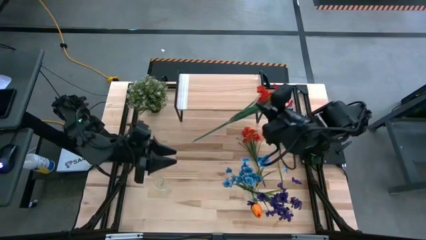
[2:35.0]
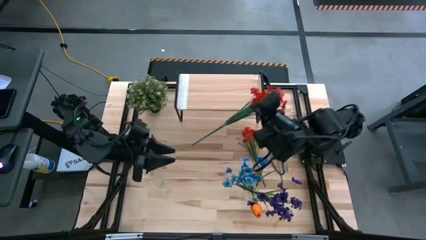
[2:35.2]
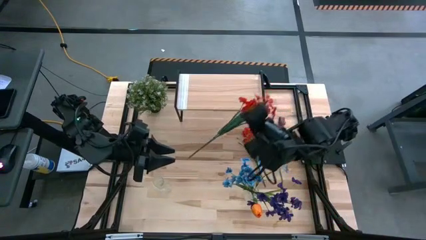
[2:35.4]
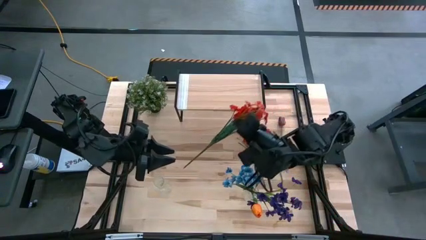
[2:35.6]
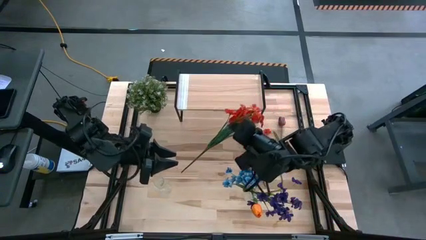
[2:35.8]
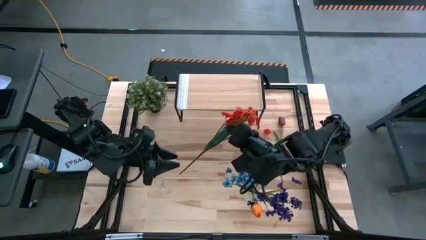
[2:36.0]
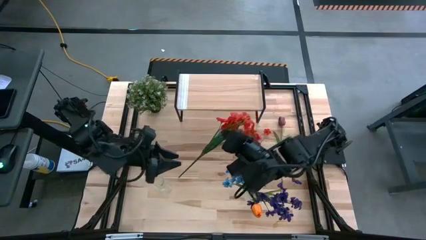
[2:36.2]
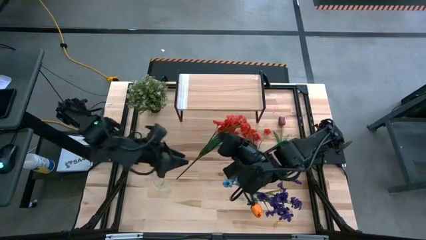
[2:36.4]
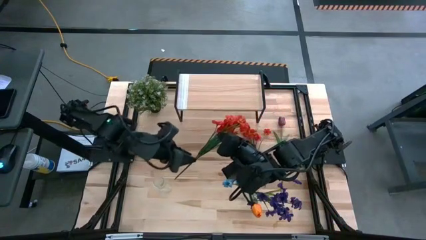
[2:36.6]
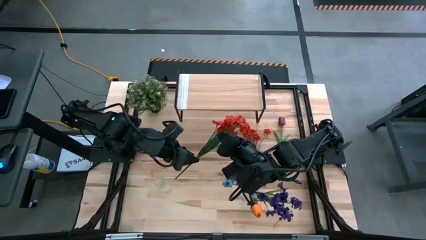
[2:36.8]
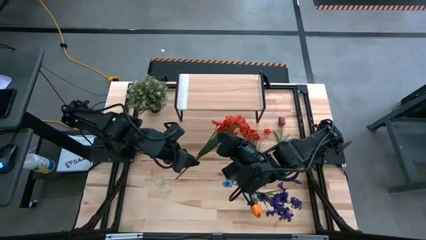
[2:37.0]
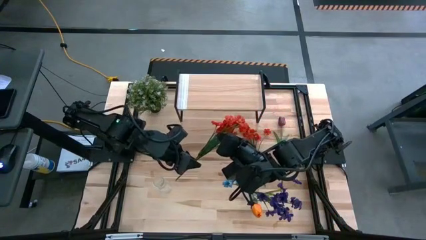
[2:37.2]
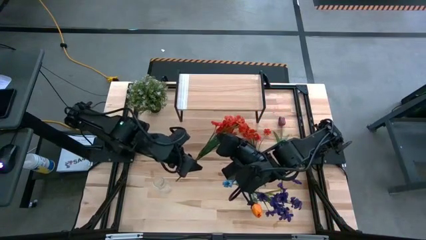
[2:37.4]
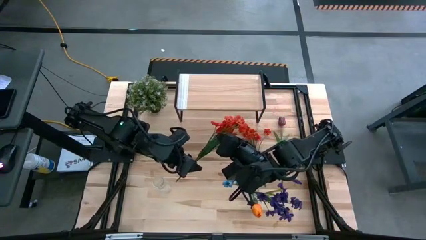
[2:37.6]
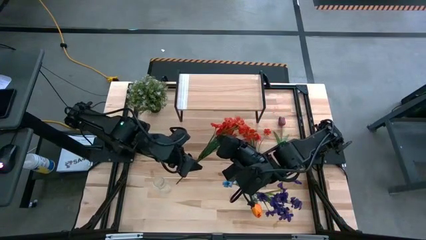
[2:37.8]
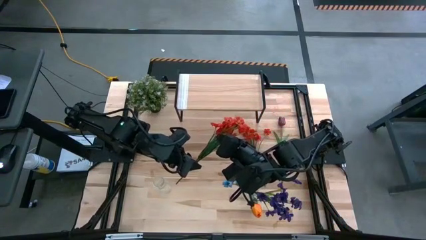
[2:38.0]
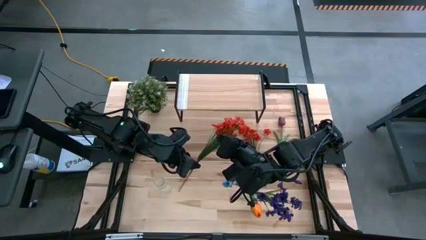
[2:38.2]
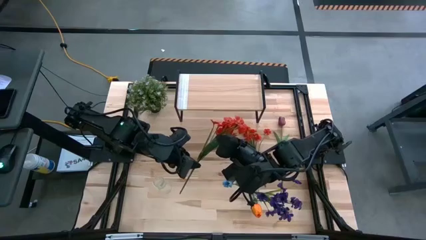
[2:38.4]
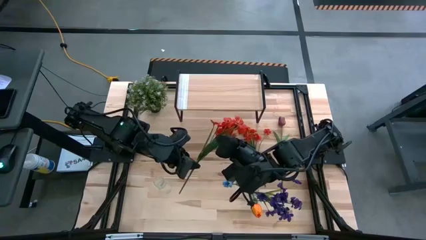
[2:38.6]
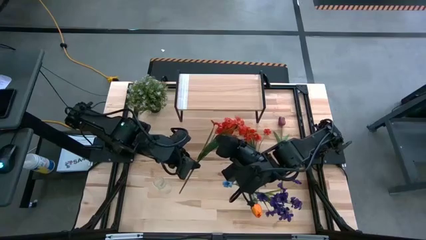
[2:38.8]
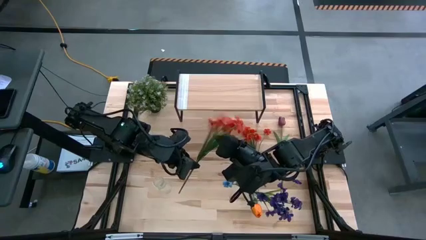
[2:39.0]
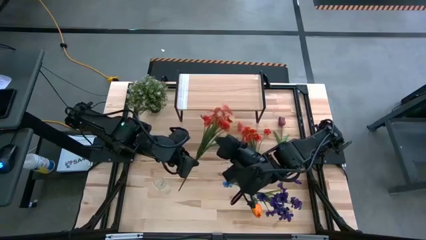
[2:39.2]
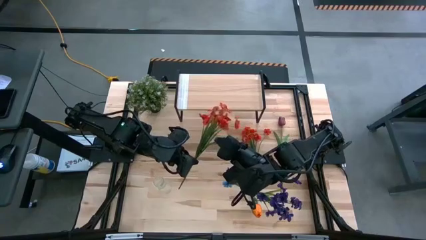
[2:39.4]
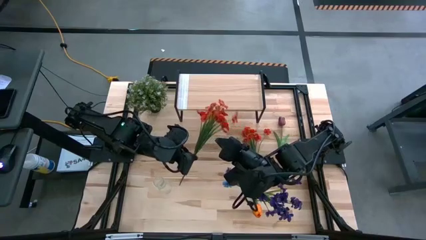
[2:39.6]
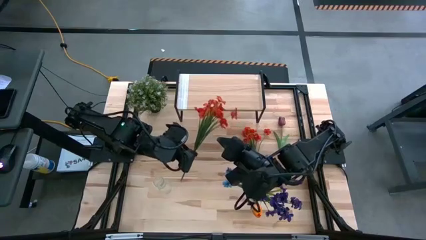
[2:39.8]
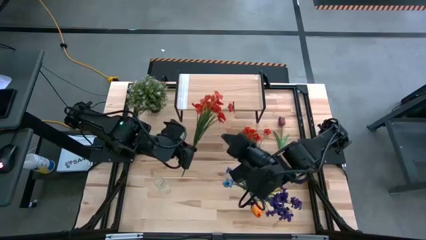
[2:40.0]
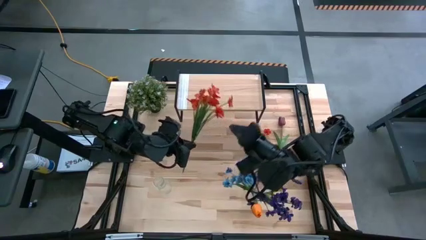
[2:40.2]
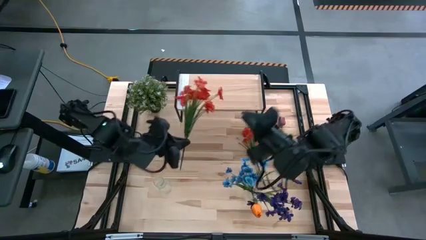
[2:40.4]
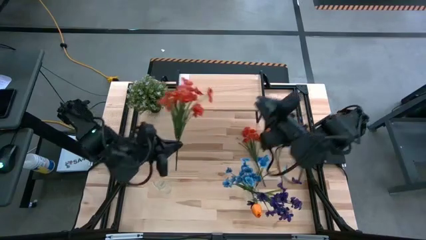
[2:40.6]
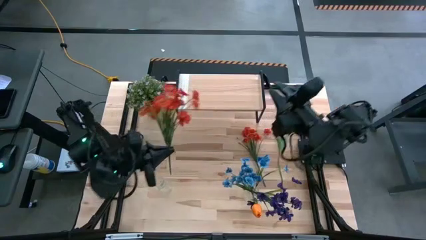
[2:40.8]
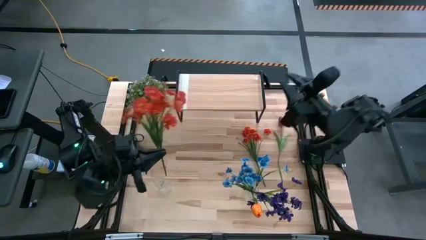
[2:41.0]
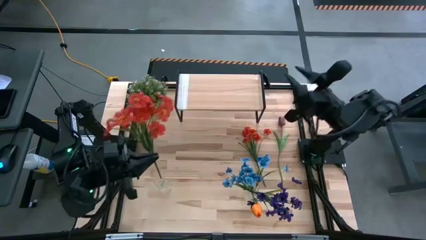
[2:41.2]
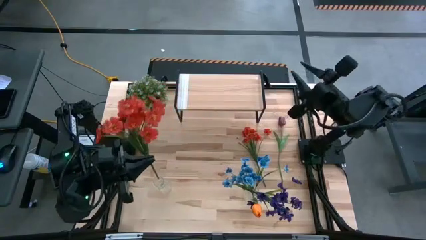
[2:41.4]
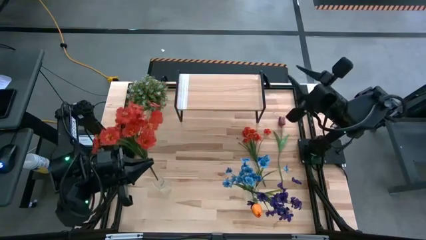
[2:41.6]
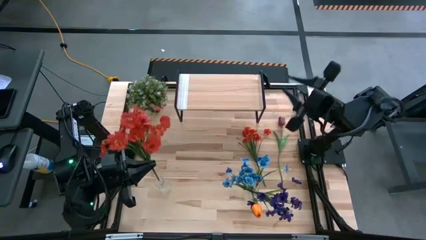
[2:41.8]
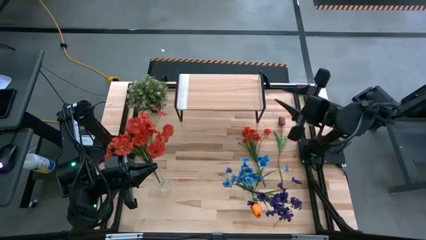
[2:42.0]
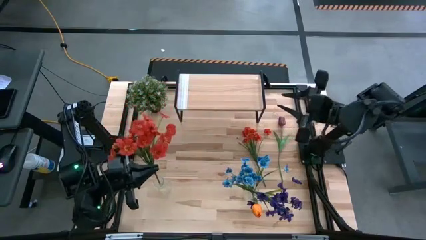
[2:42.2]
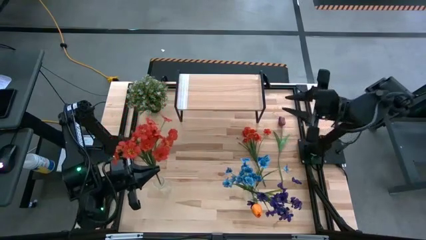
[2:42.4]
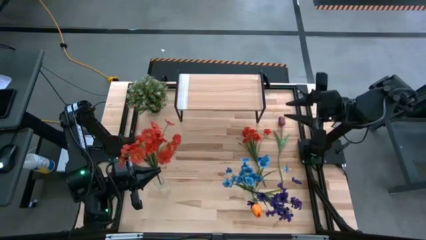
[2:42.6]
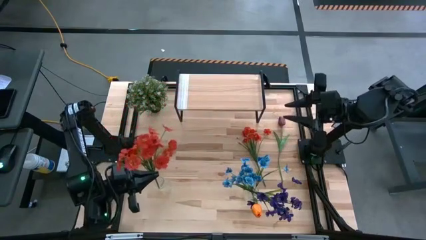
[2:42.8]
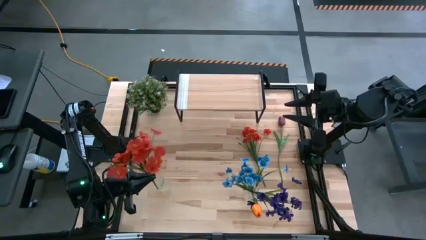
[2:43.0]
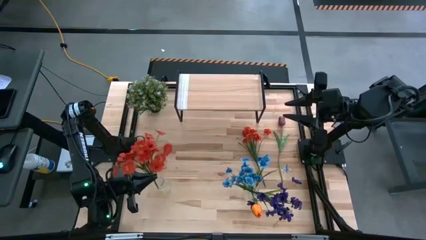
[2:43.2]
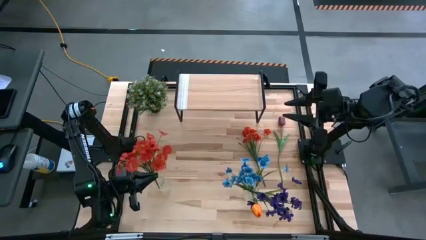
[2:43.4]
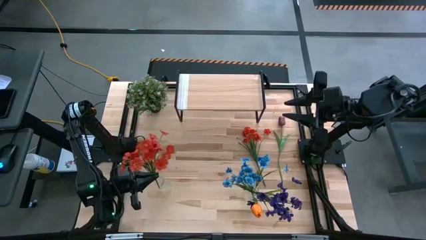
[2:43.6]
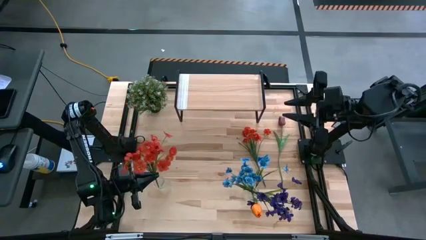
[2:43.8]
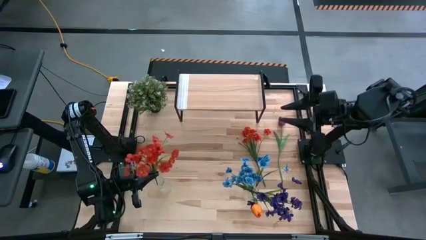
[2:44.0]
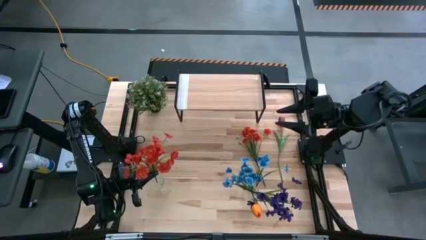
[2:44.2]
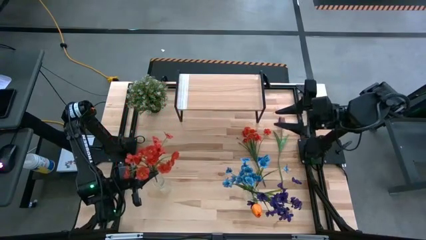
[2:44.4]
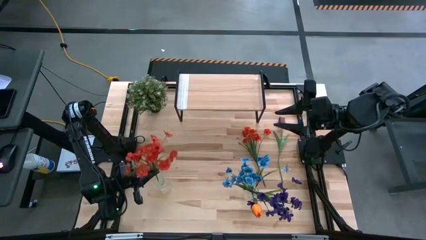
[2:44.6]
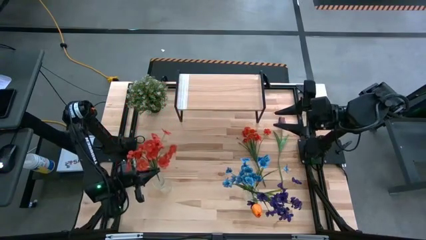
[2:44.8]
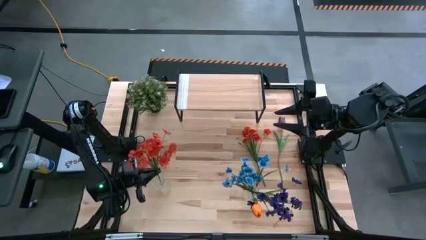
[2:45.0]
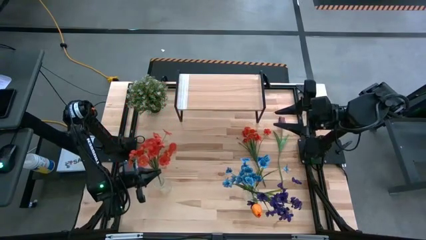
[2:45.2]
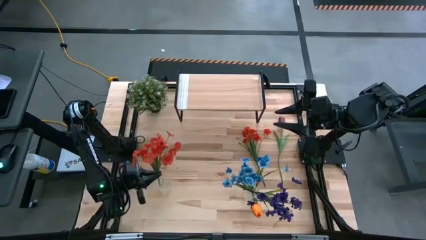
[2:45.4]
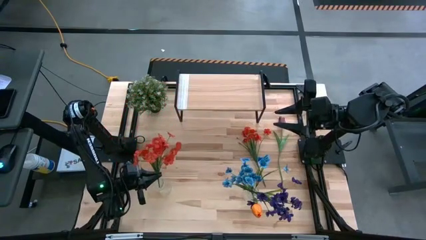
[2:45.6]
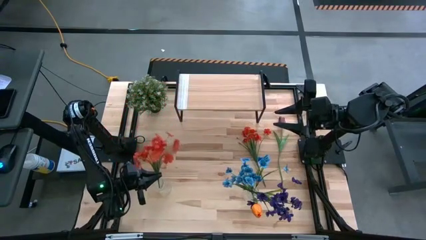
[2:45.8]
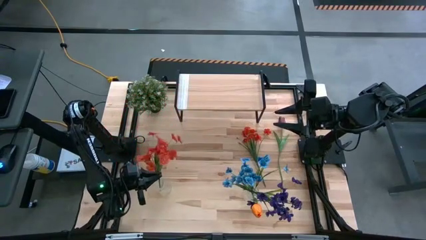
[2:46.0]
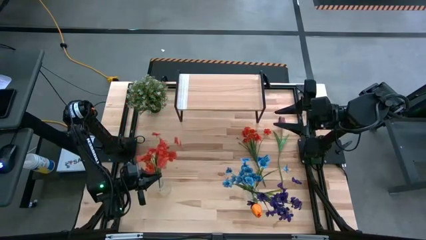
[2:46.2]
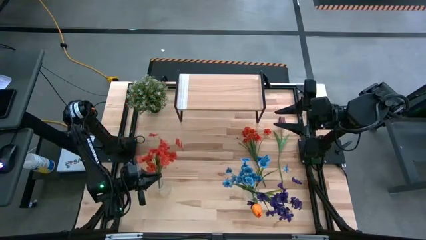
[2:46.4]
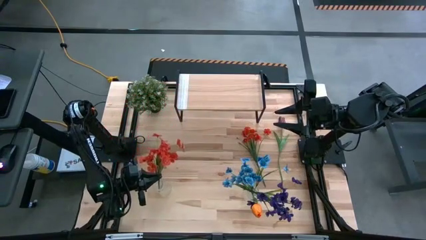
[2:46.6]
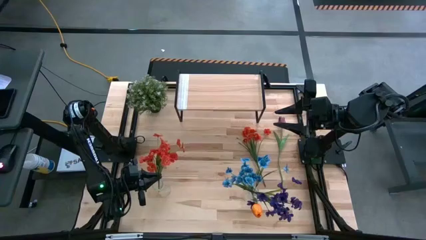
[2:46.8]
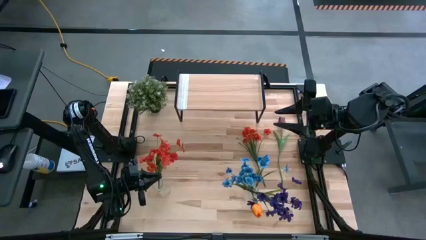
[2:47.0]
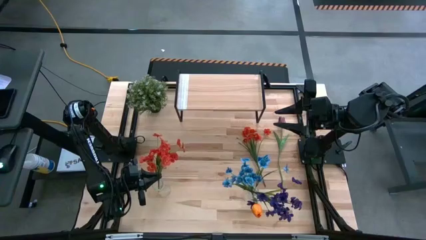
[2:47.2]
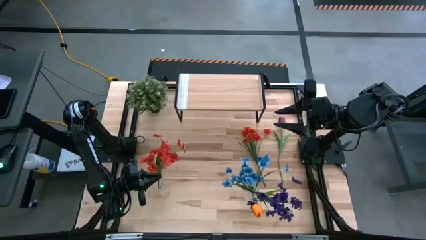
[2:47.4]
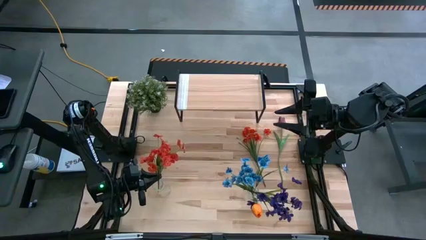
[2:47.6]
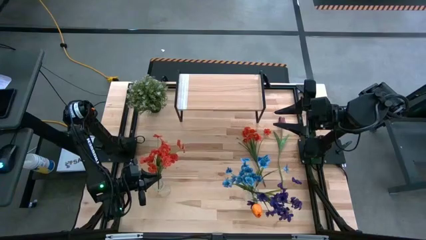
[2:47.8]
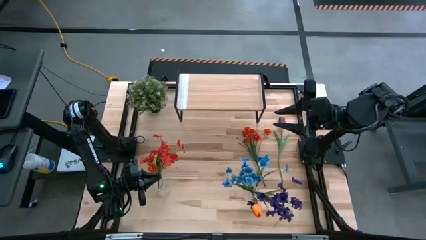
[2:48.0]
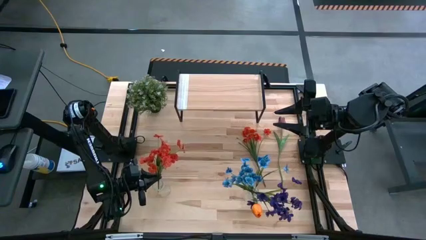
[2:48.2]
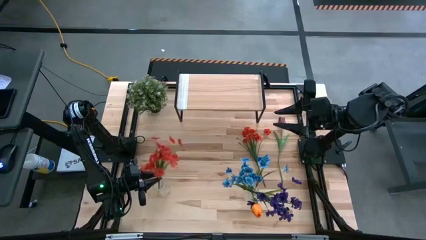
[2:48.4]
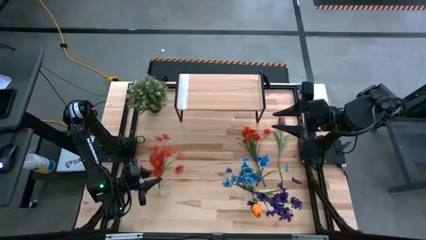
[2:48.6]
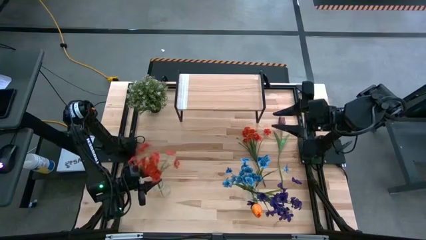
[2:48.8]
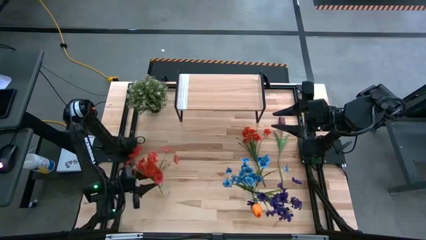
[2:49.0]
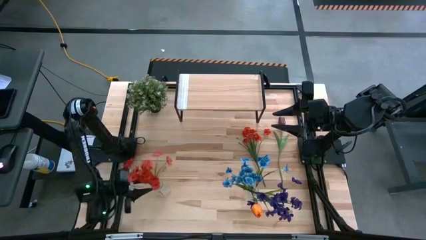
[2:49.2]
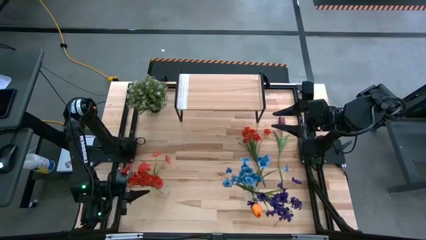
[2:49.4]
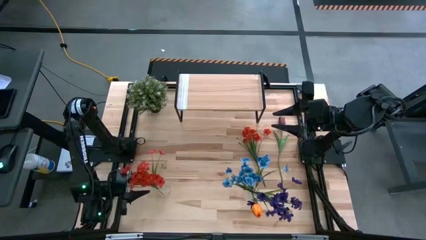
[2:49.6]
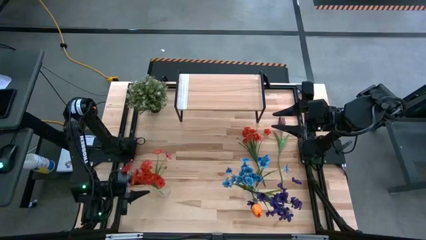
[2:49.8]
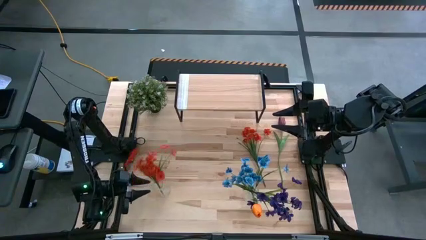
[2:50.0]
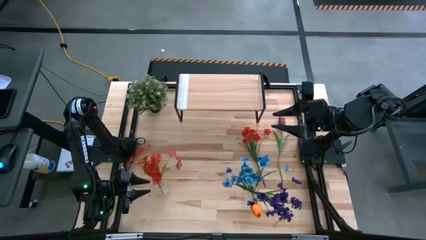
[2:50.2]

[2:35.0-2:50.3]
Task: Pick and place flowers into a vace then onto a shelf
Put the bottom orange flowers into the left transparent vase
